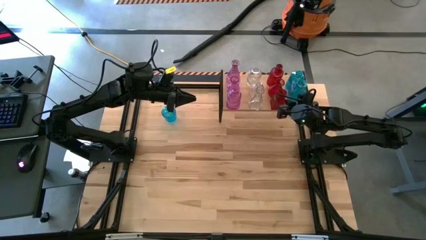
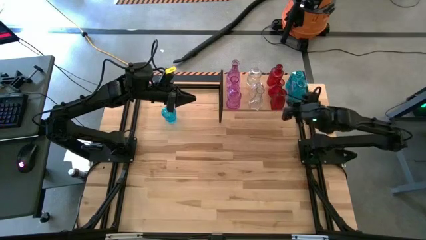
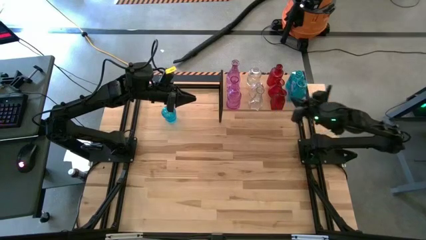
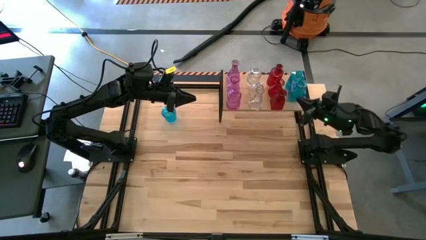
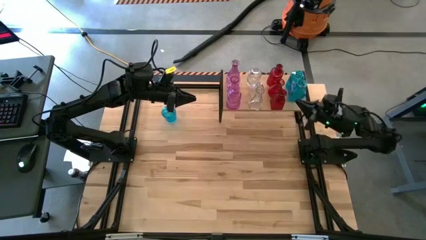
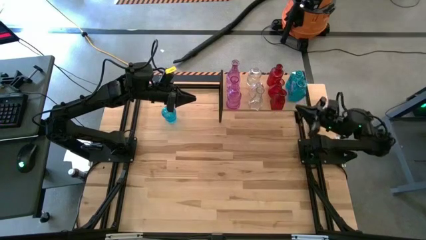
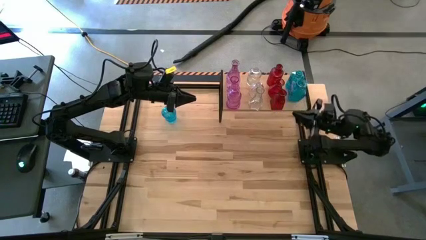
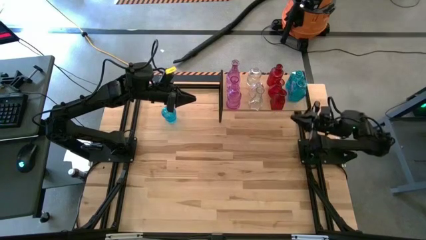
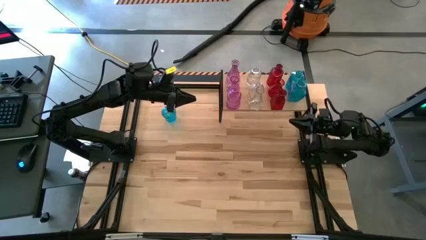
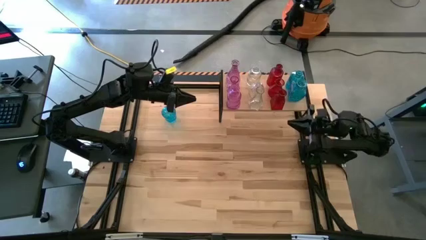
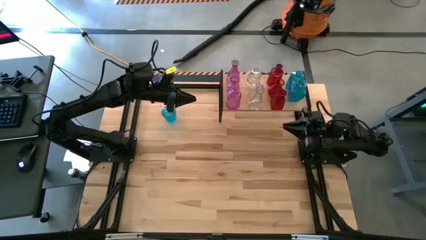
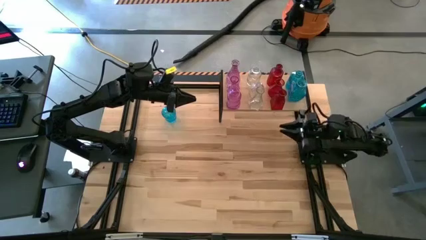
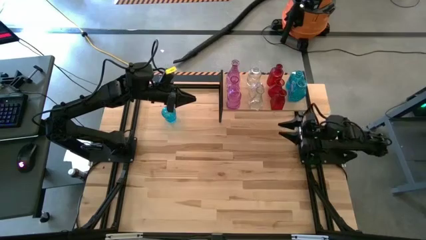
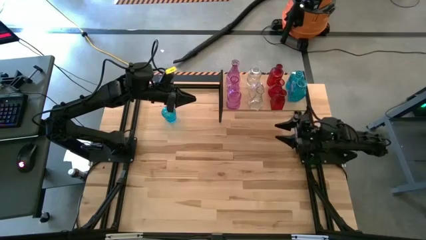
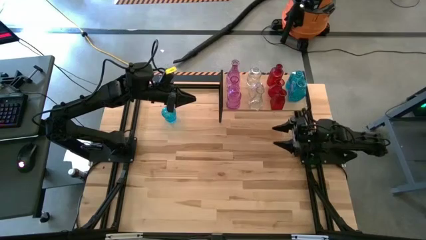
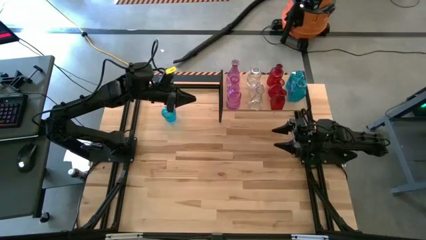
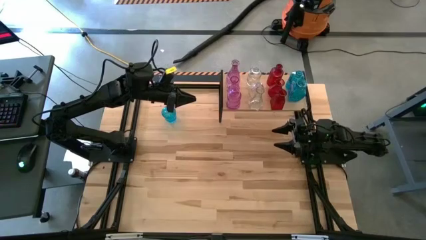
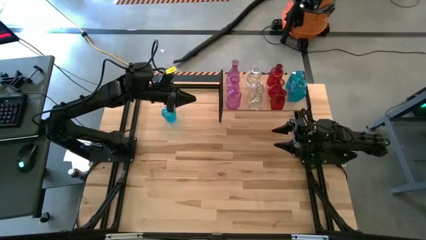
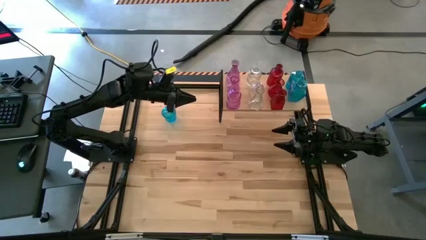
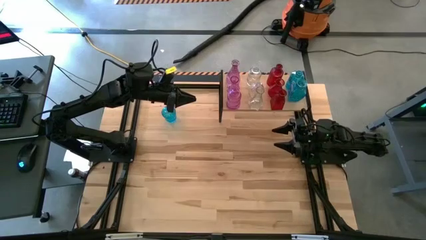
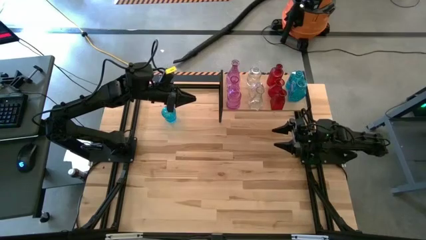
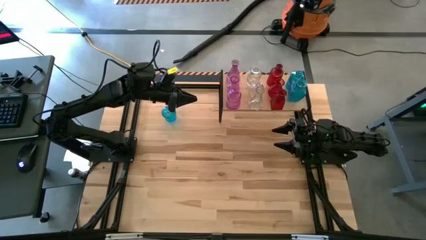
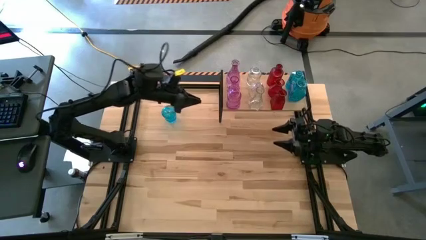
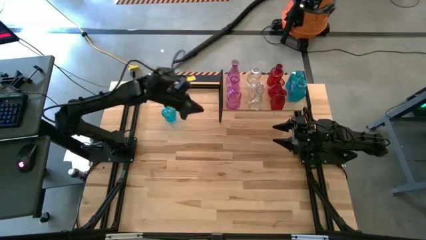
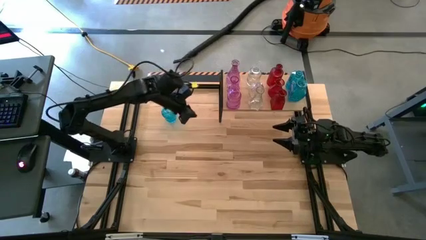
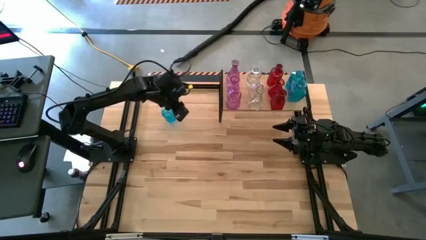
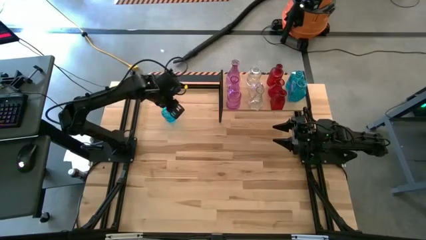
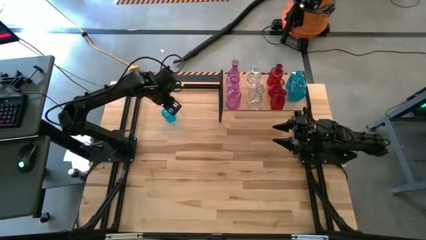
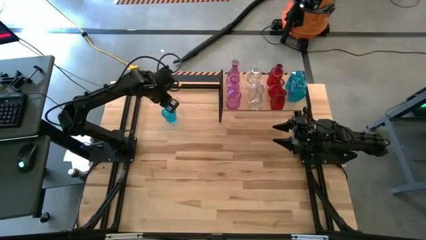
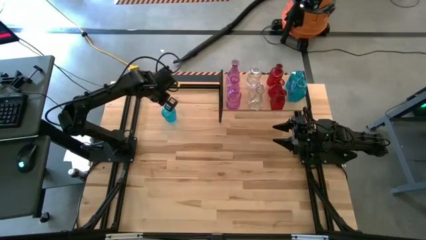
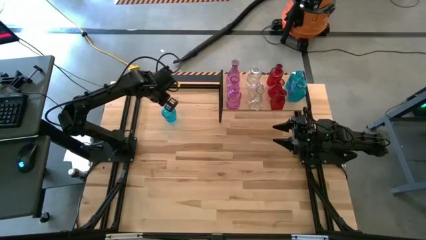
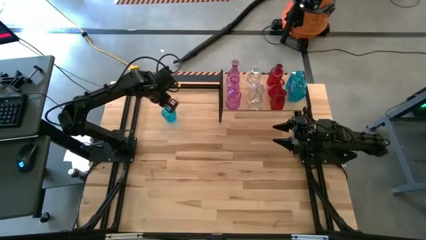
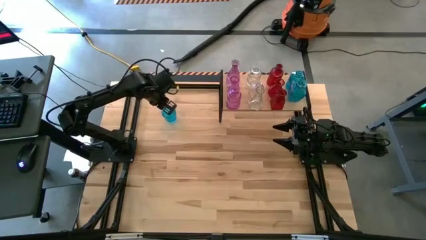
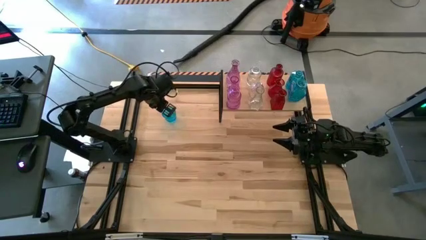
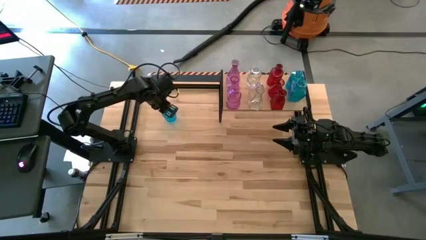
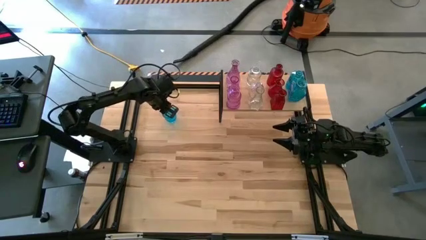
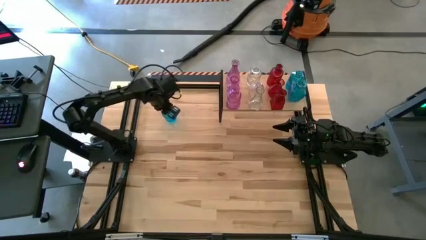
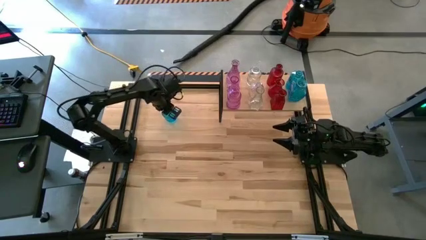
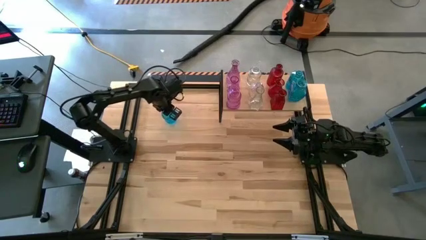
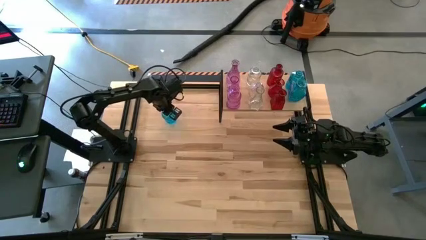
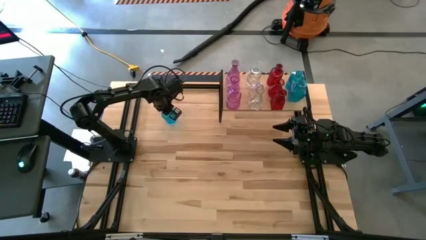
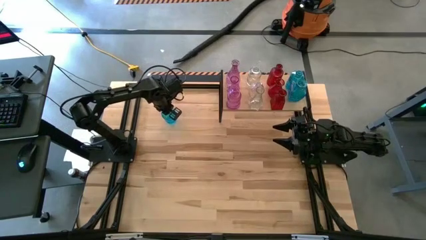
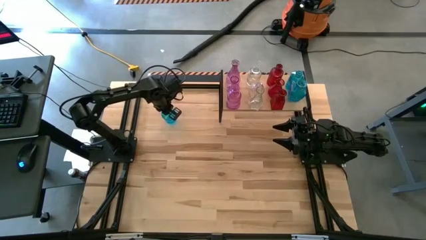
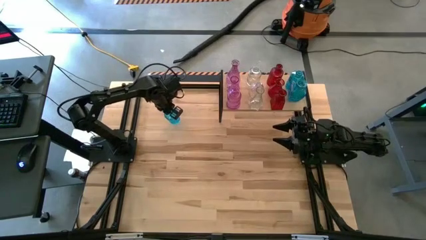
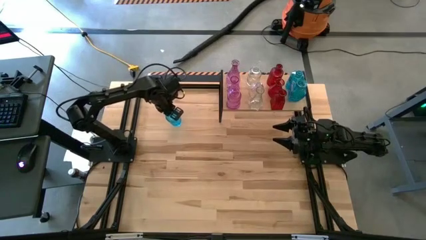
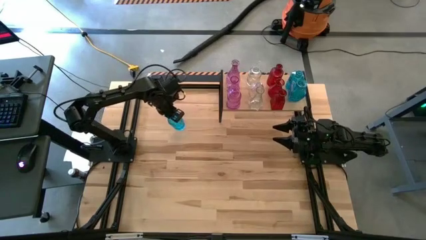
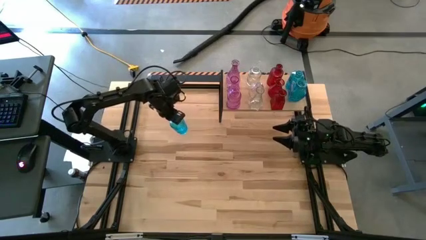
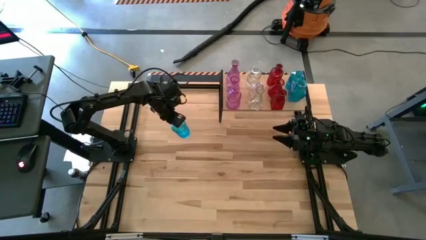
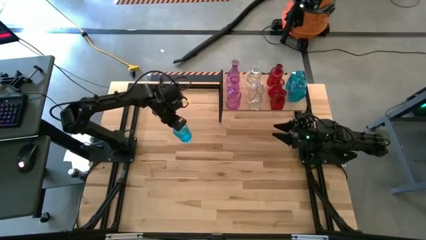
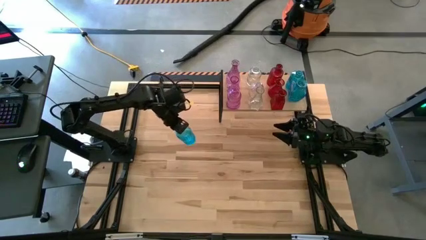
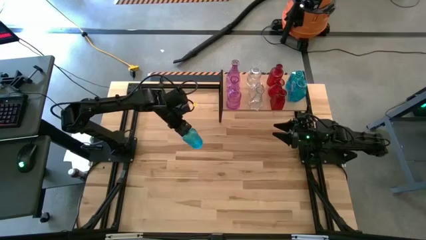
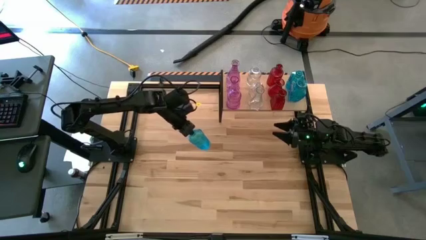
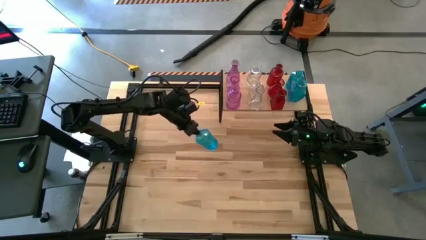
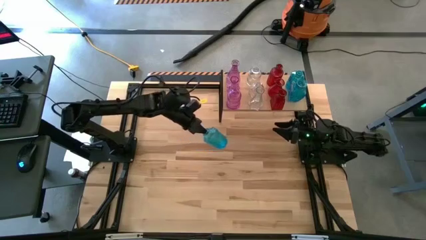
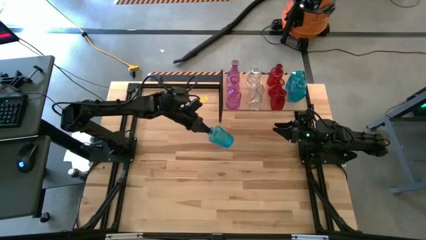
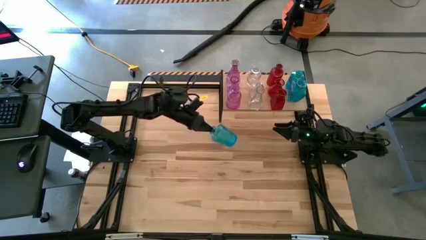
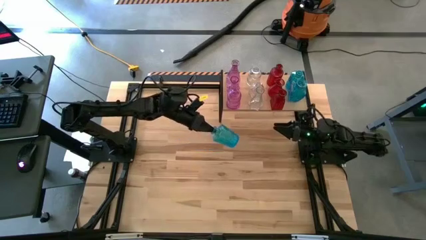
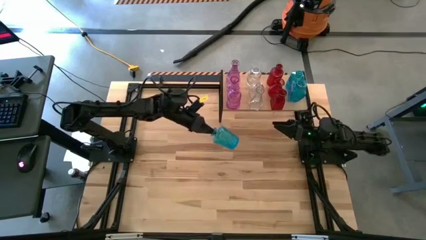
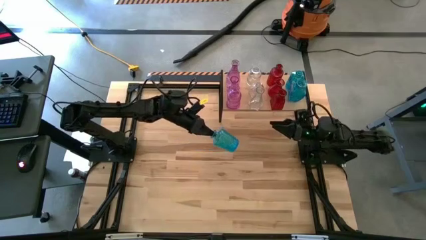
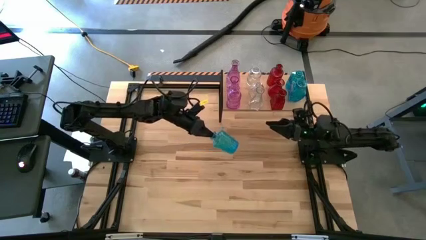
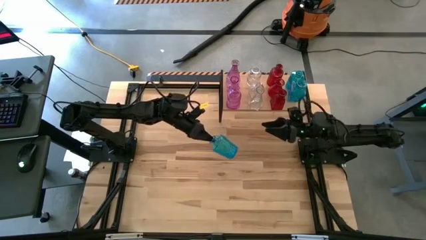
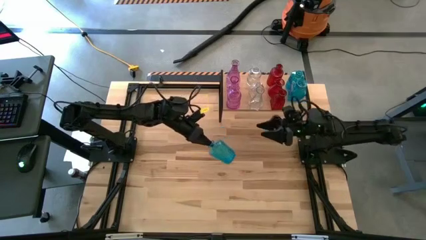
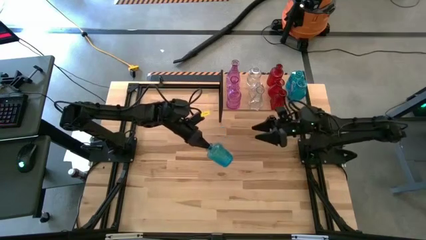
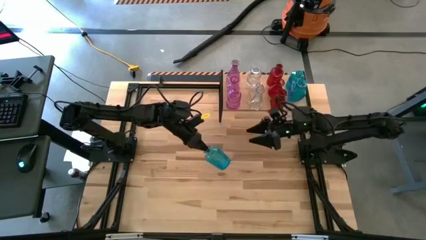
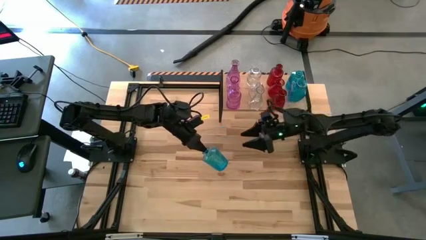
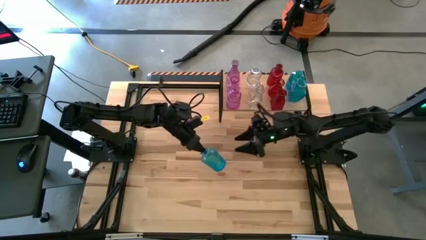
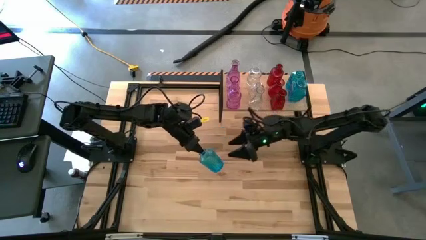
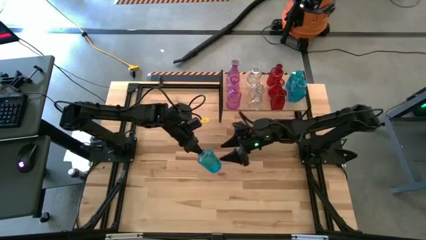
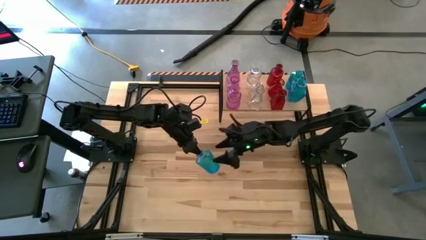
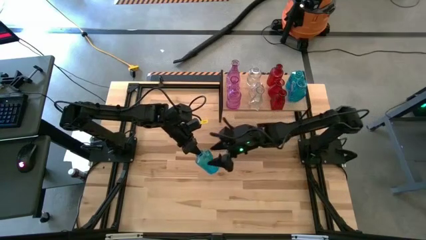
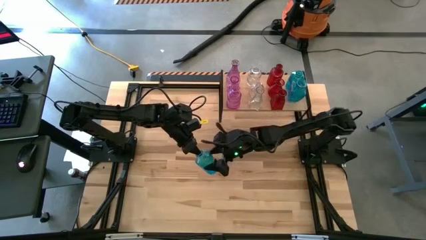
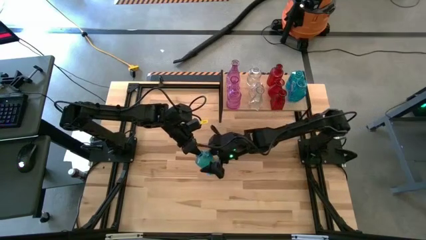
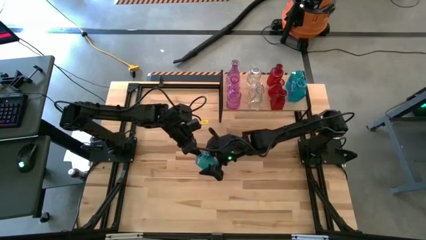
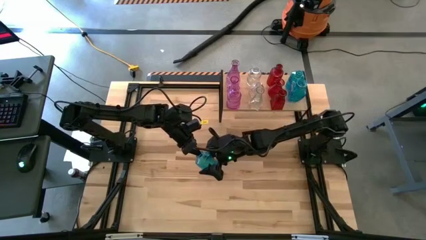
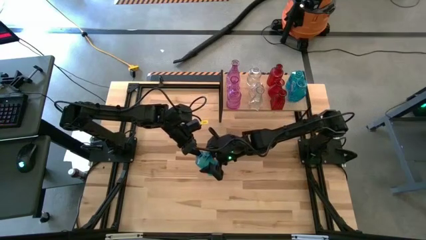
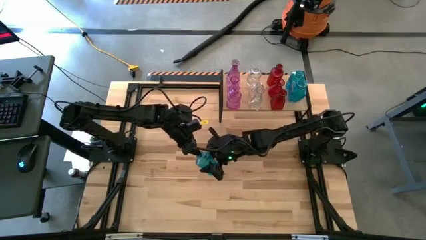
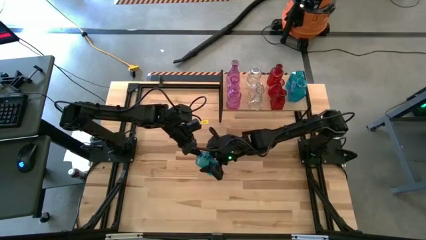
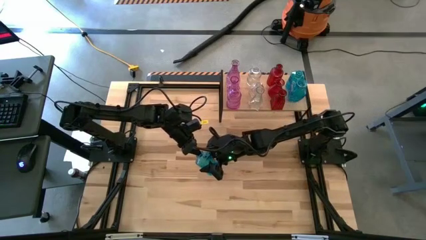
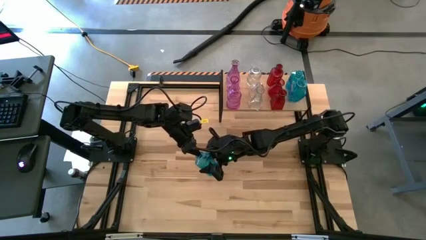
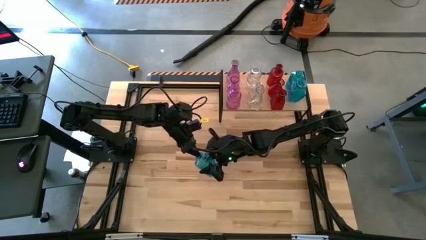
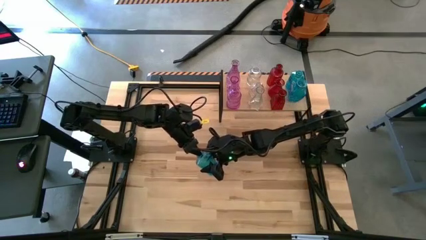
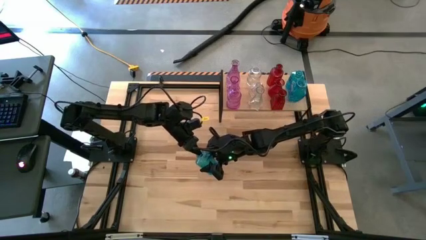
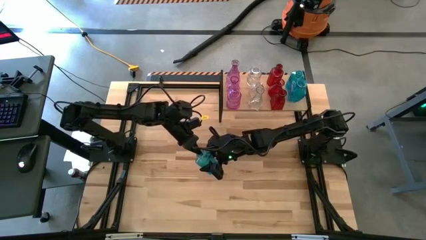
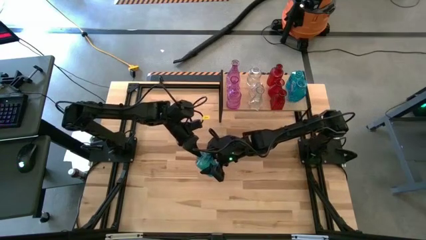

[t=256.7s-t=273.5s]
Task: sort vases onto shelf
Put the blue vase on the shelf aligned with the other blue vase
